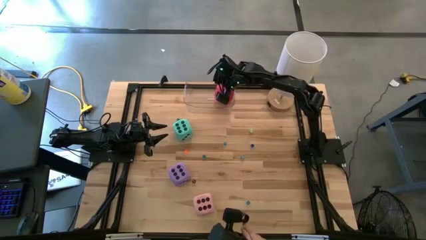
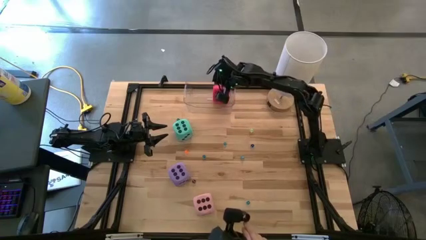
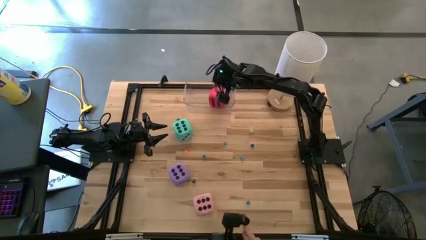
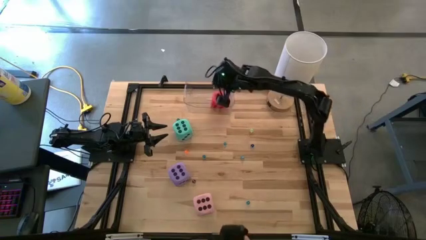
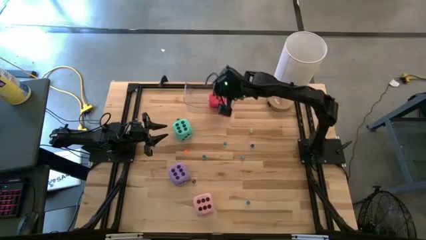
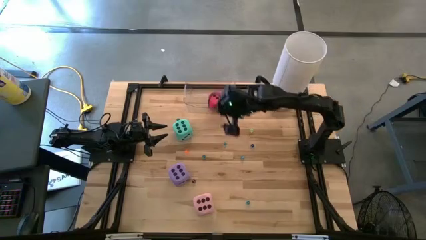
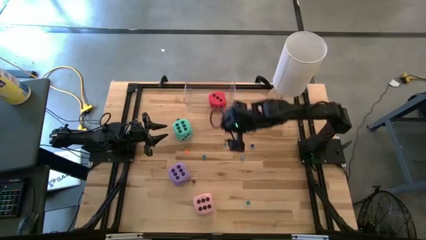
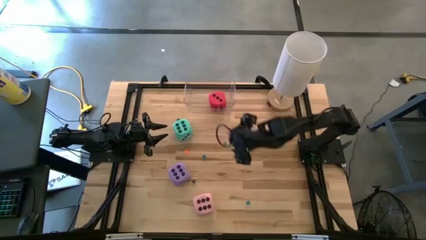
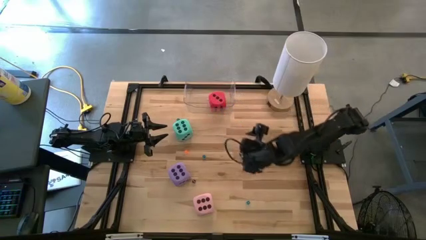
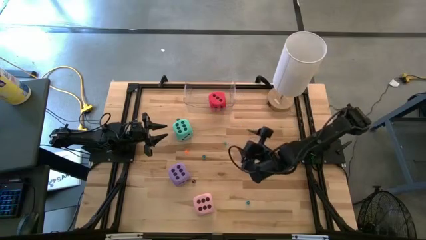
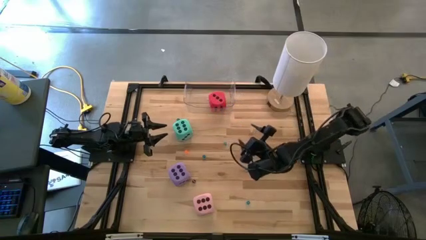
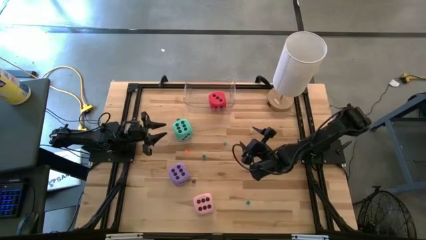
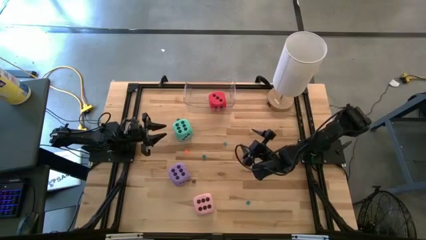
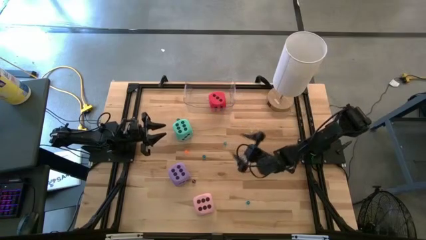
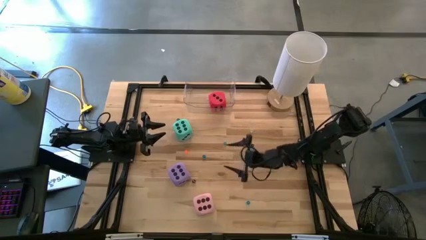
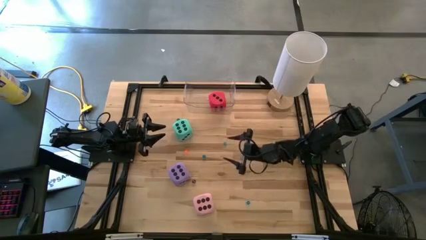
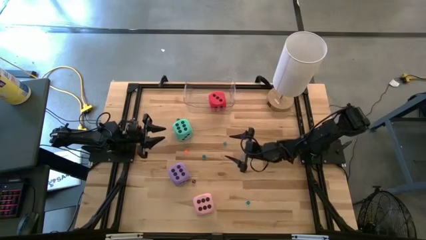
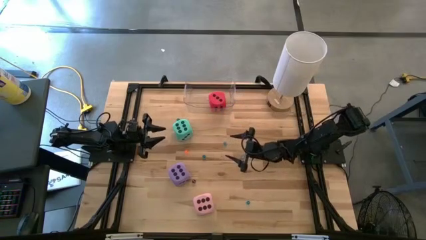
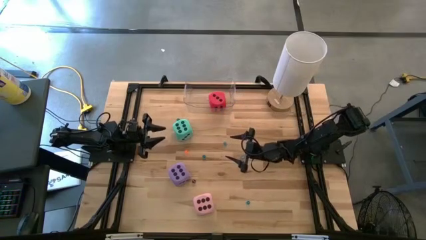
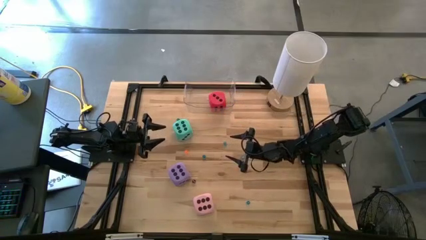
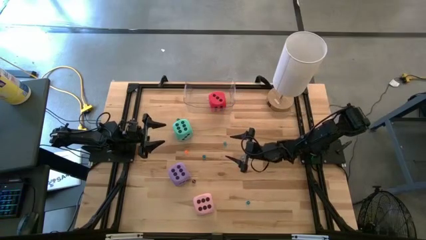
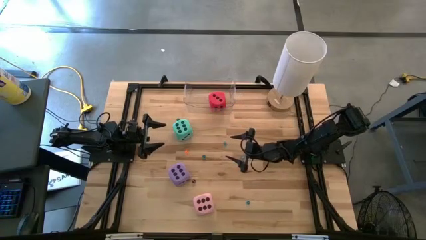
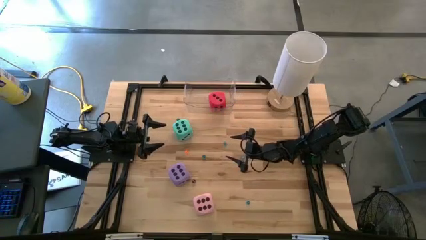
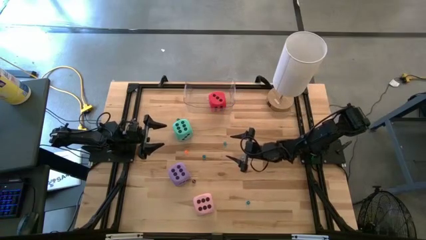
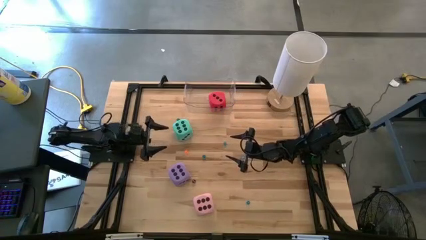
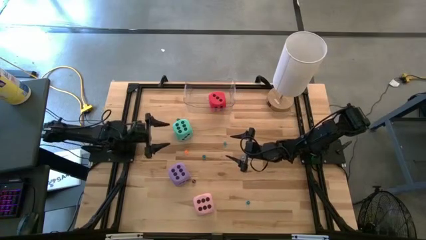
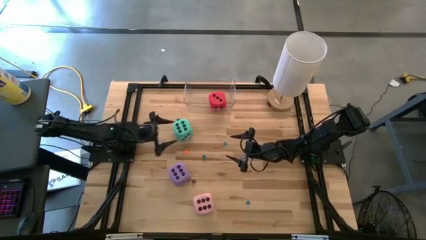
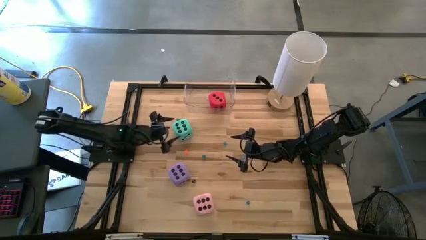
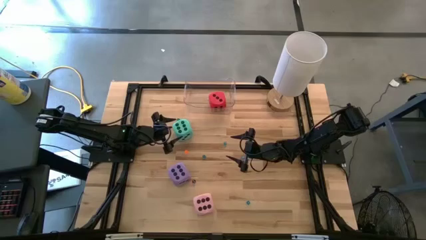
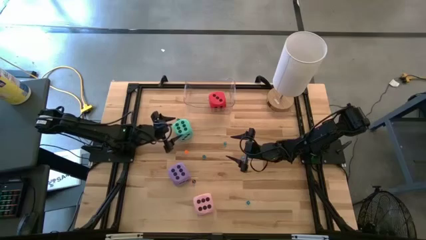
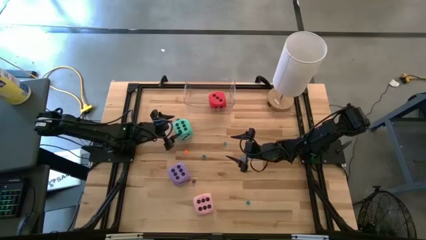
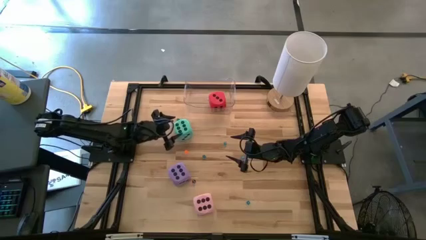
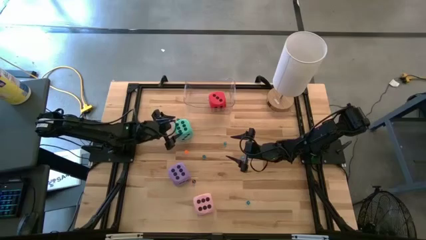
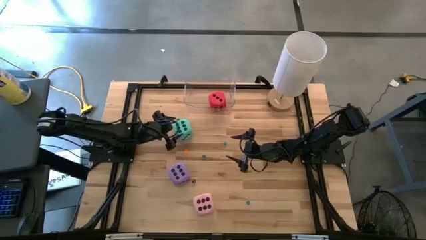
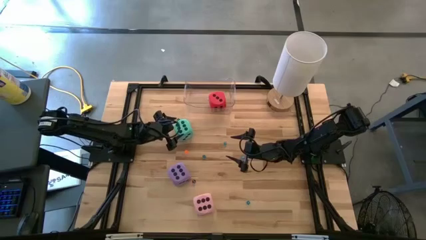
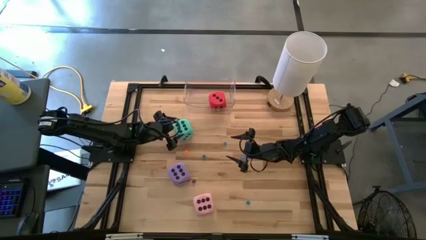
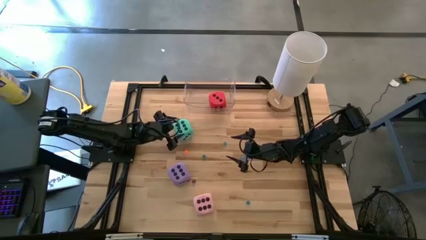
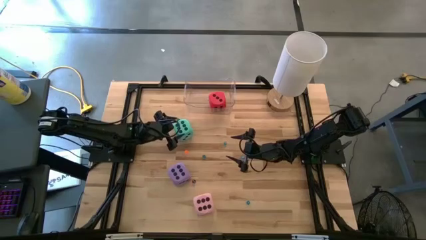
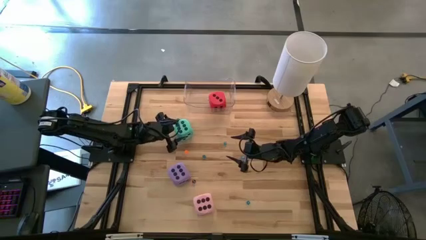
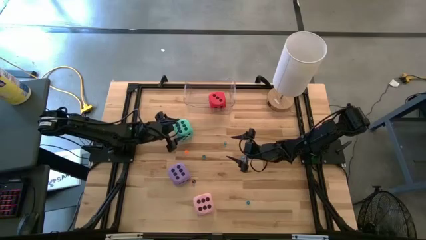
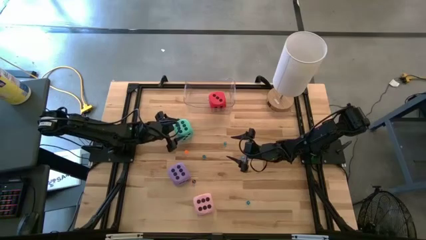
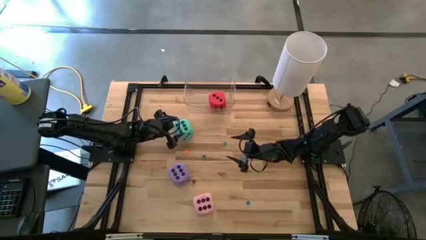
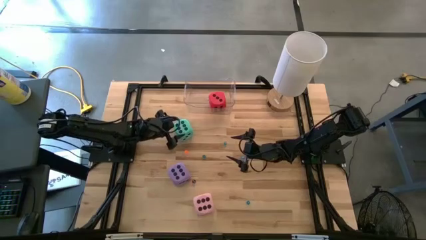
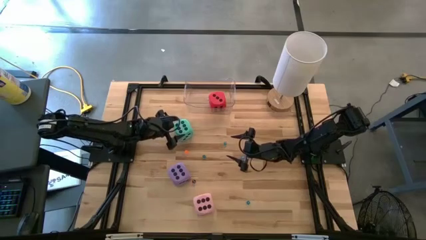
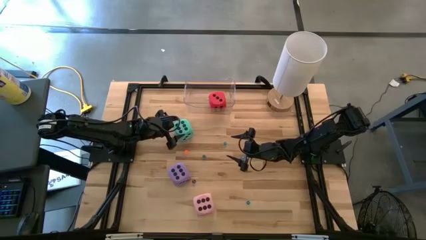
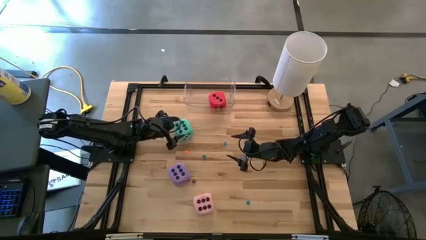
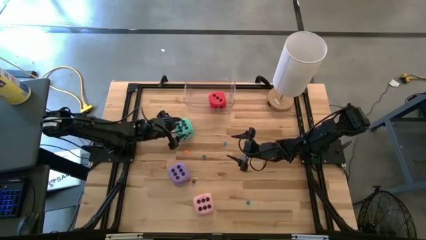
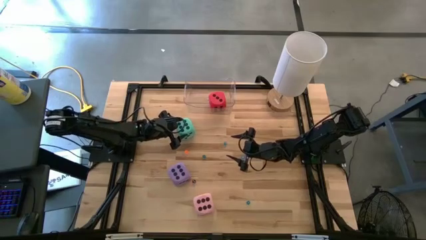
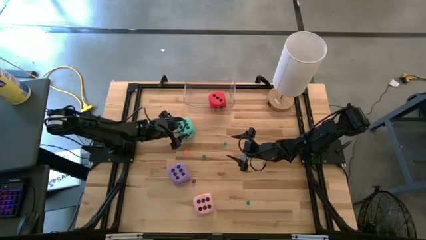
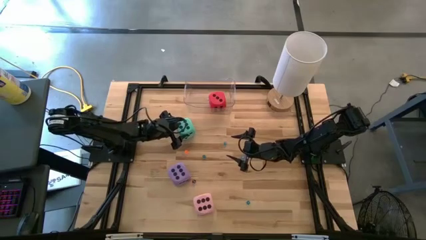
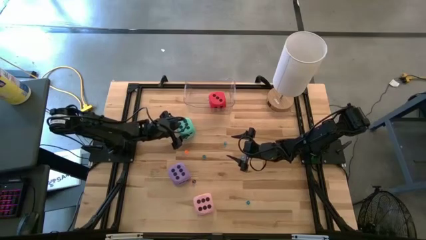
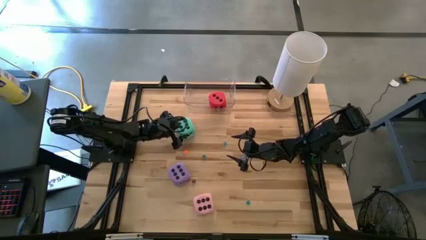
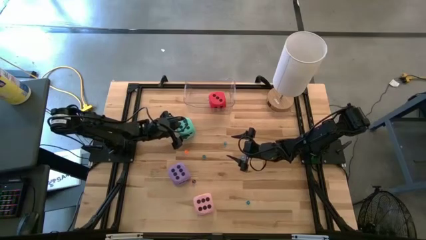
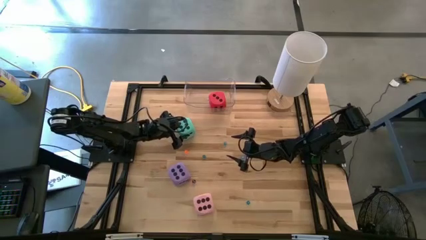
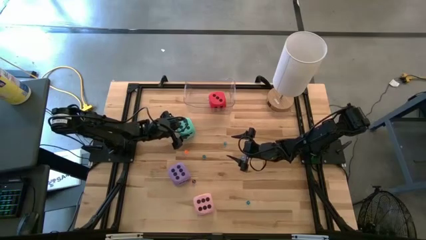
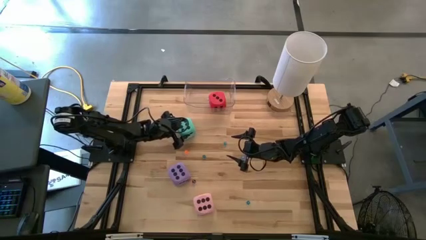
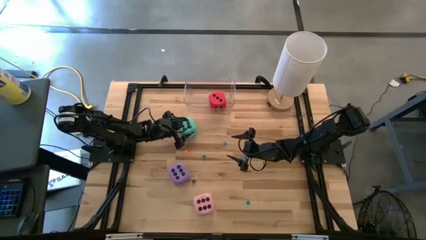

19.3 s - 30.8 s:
Task: Pick & Place Dice
Put the top large light blue dice in the transparent bin

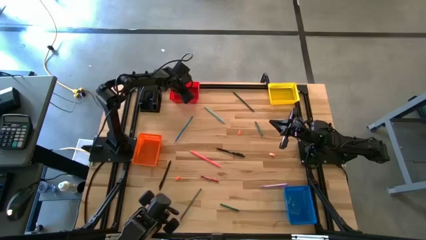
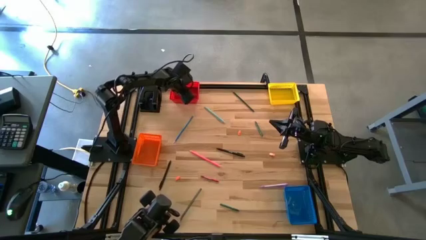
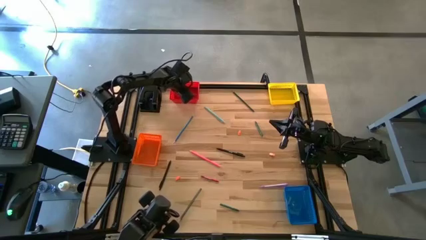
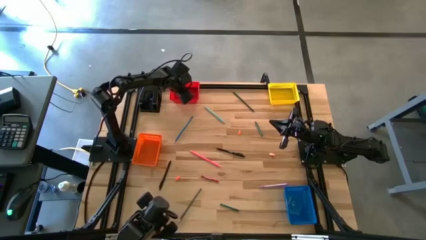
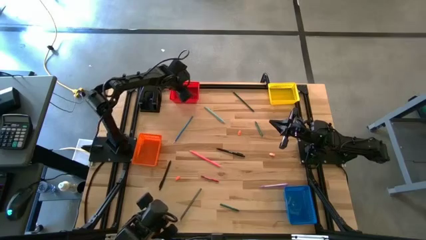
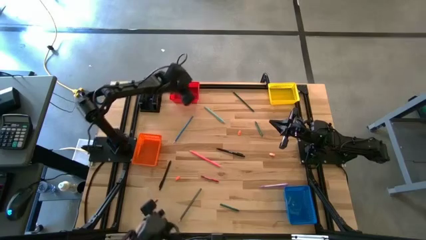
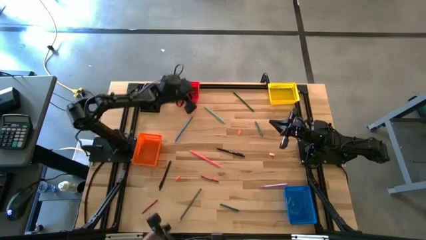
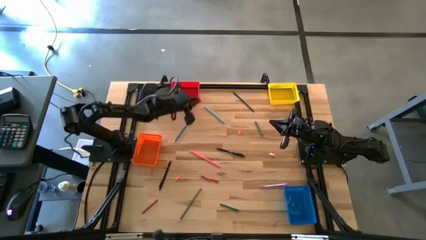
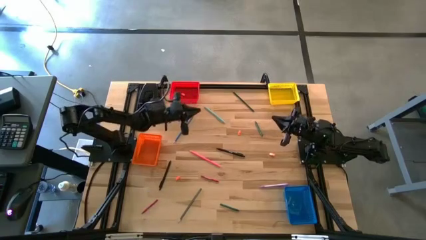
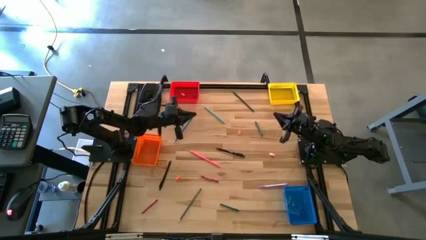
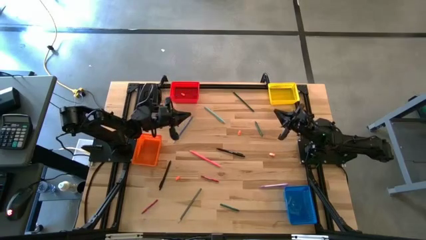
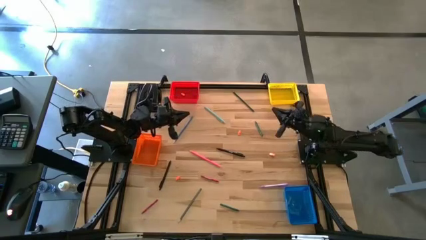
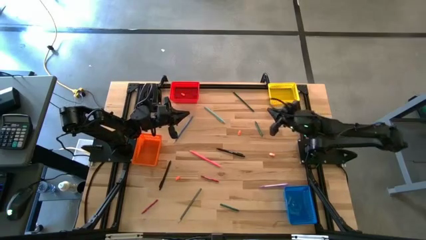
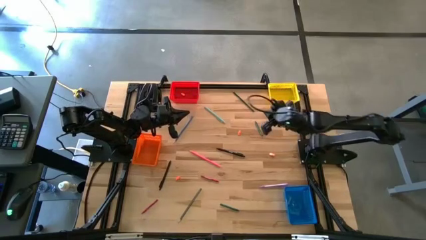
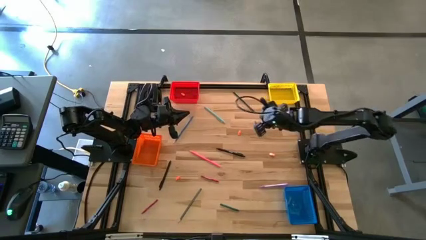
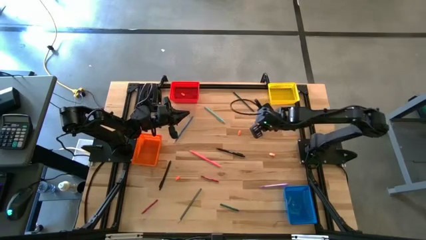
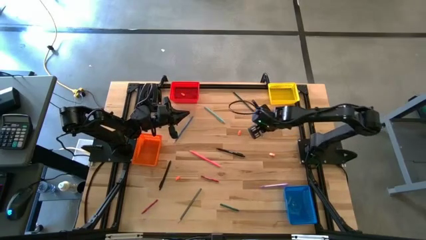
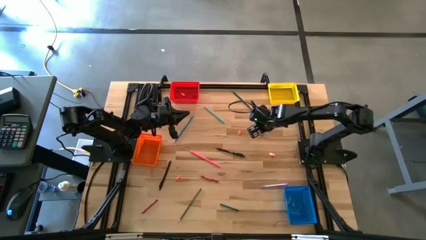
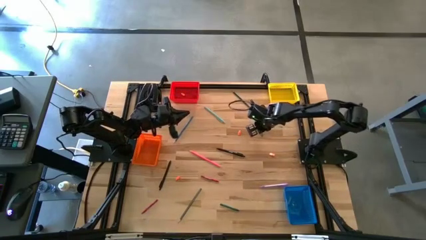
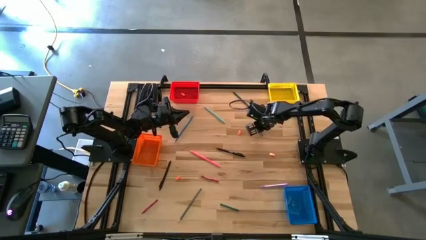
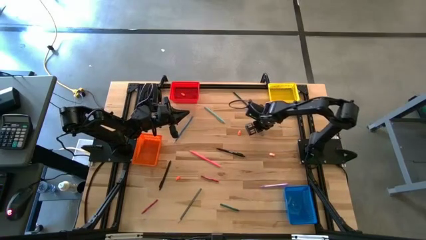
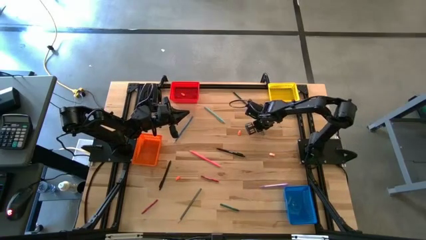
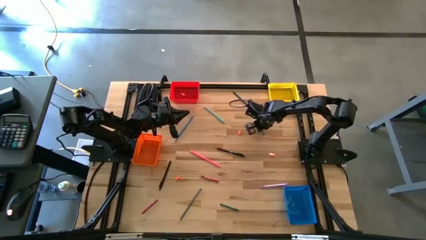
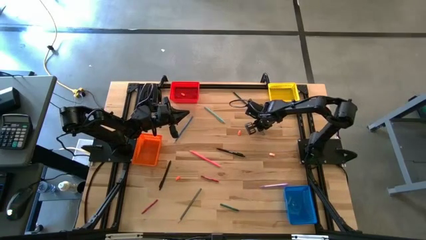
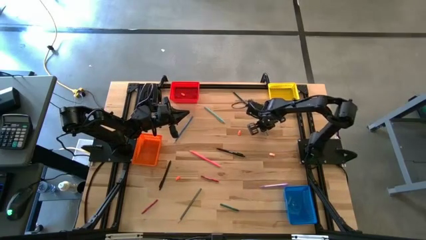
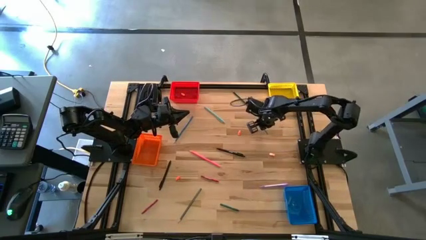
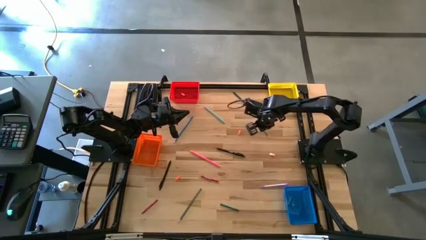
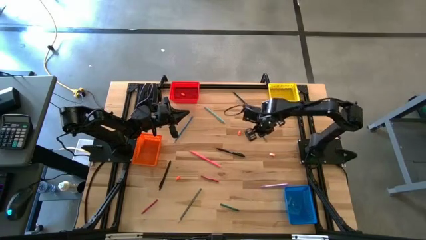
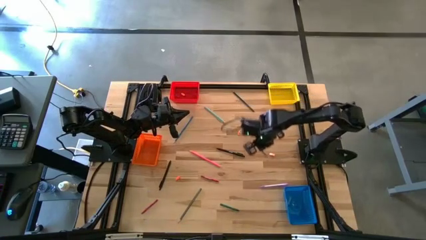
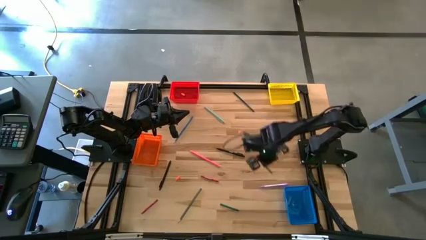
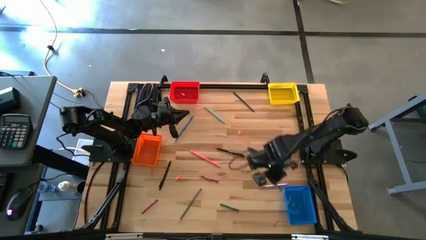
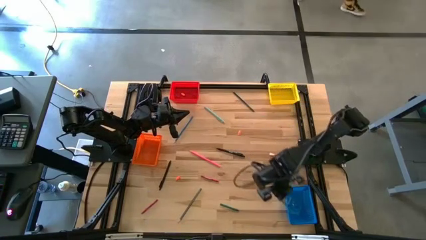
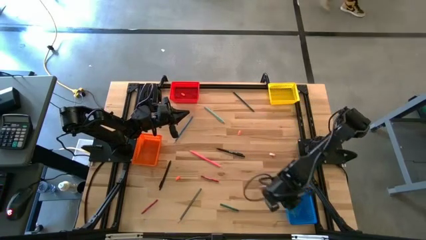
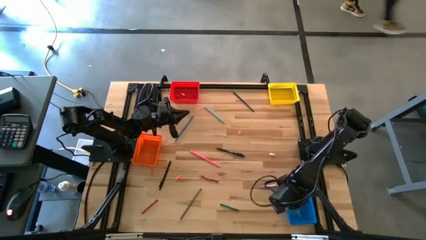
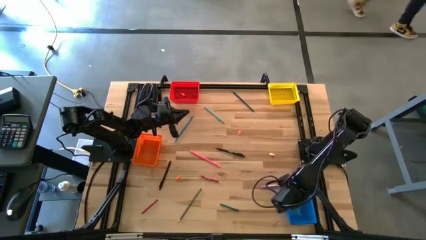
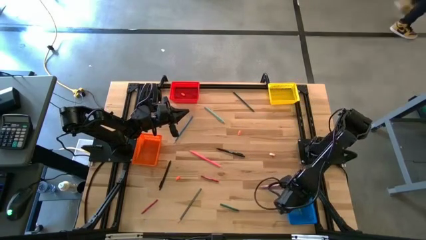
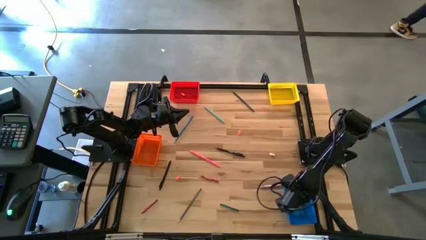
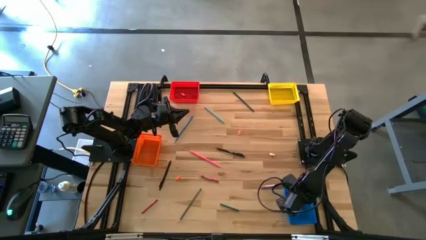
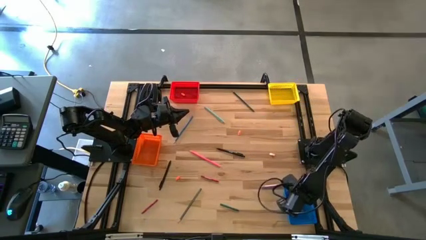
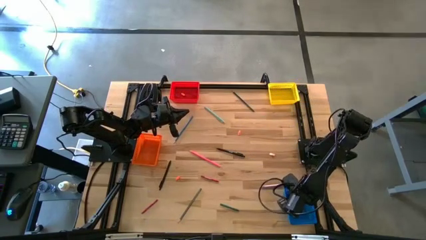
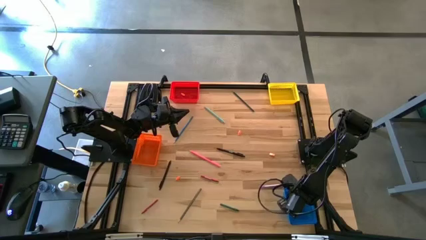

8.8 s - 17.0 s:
Task: Sort crayons/erasers/pens/pencils in bins
Put the green crayon into the blue basket
